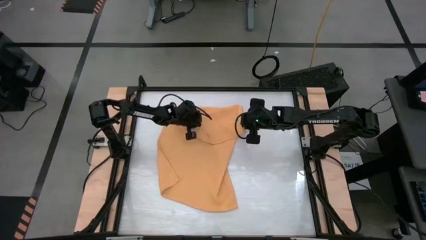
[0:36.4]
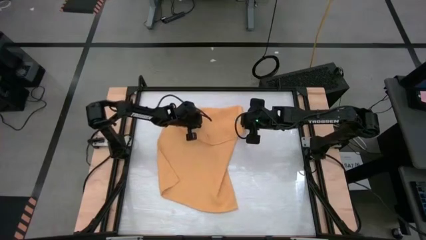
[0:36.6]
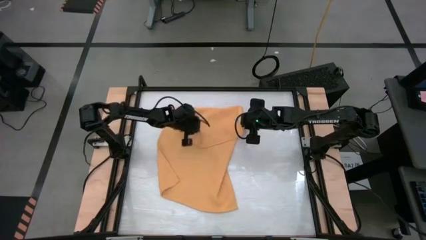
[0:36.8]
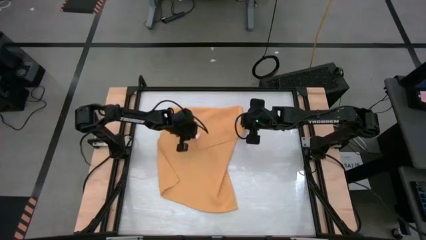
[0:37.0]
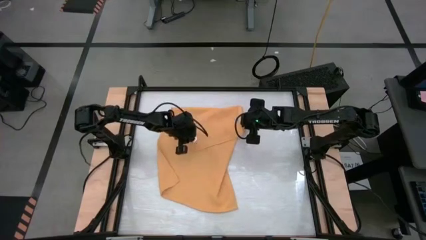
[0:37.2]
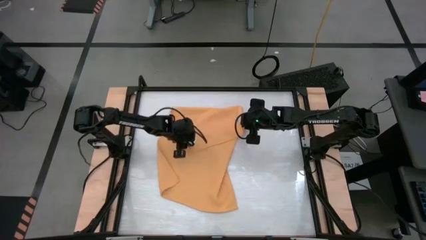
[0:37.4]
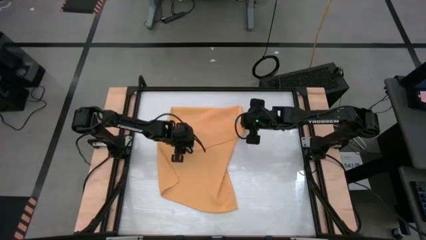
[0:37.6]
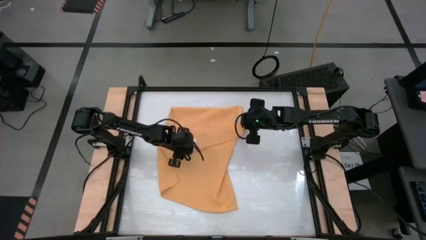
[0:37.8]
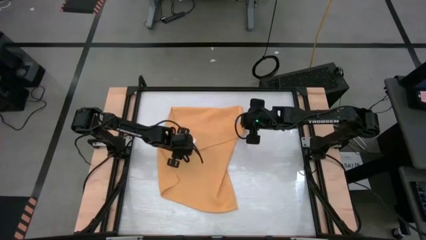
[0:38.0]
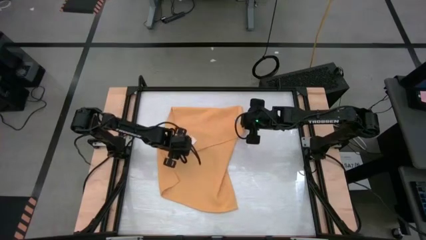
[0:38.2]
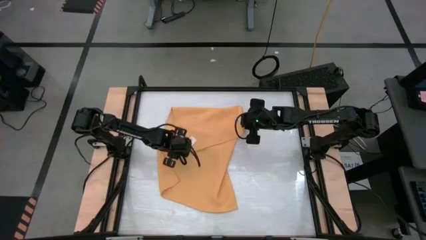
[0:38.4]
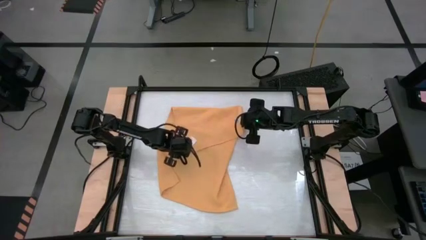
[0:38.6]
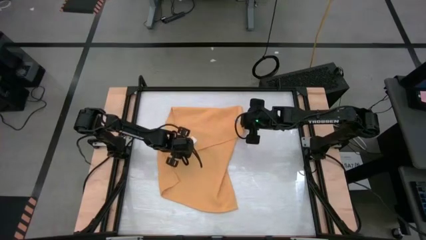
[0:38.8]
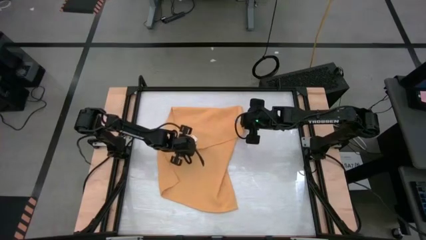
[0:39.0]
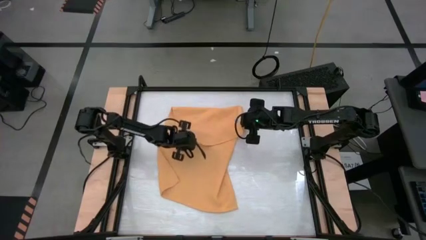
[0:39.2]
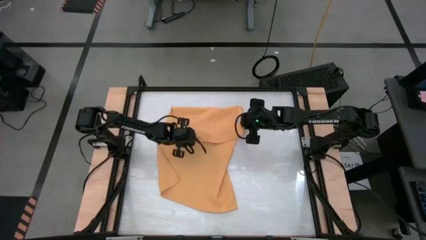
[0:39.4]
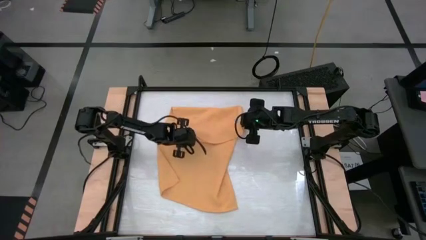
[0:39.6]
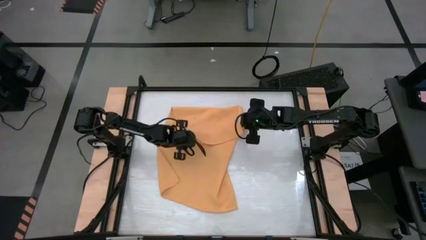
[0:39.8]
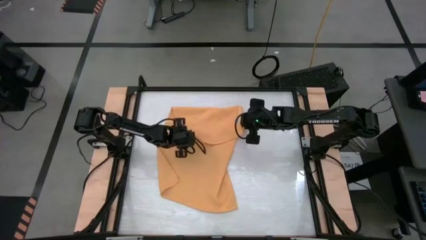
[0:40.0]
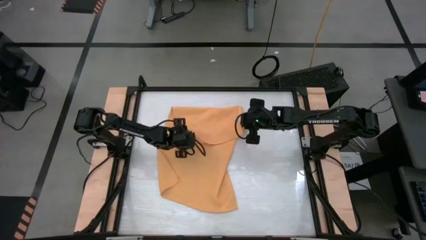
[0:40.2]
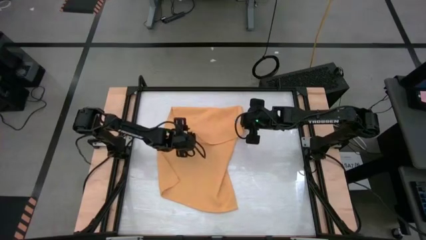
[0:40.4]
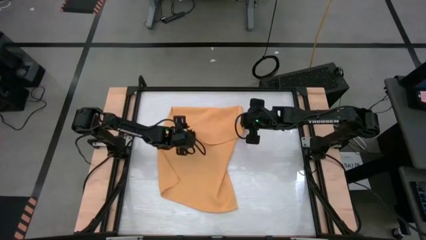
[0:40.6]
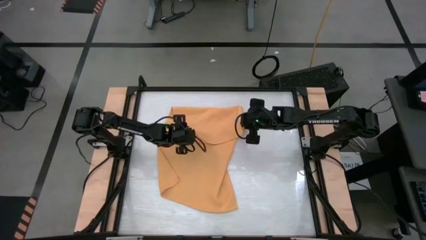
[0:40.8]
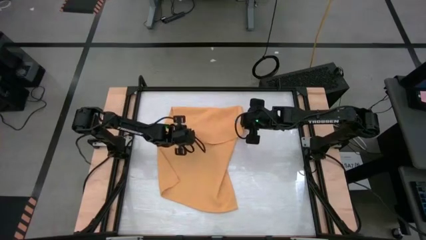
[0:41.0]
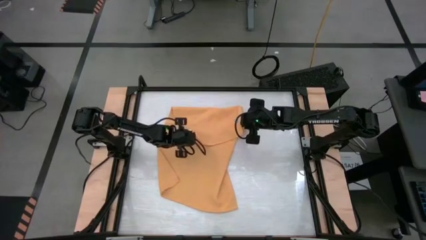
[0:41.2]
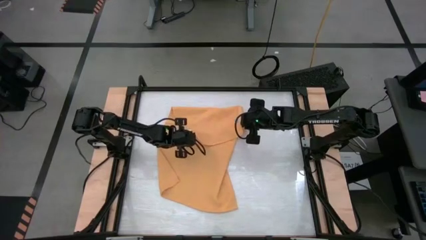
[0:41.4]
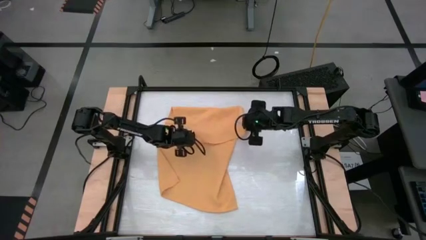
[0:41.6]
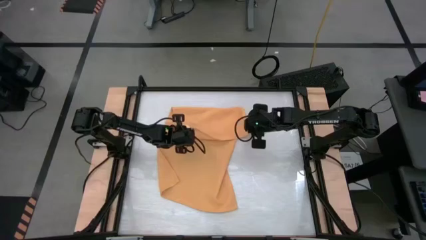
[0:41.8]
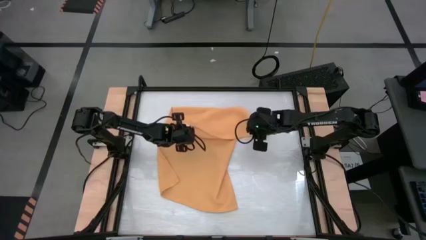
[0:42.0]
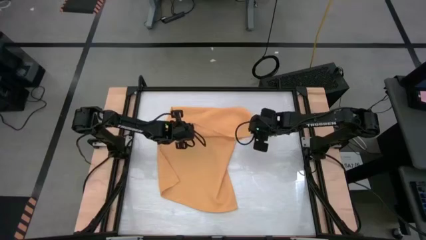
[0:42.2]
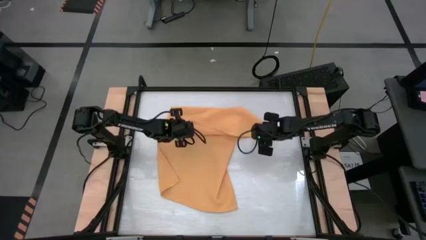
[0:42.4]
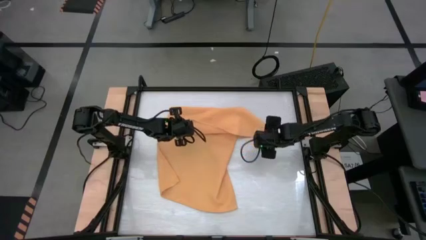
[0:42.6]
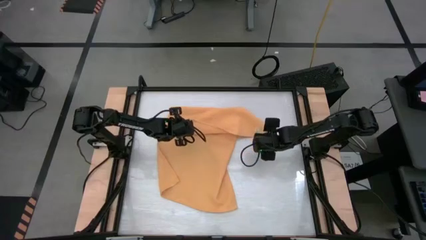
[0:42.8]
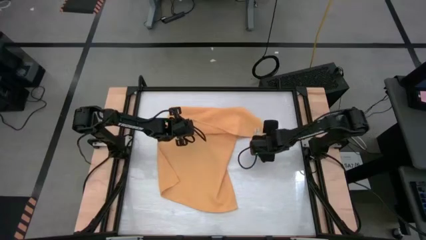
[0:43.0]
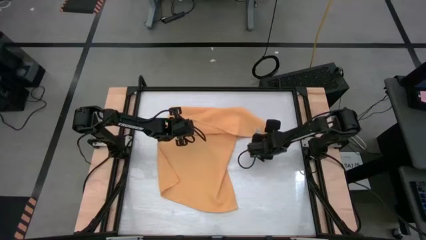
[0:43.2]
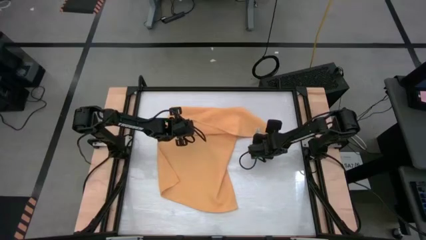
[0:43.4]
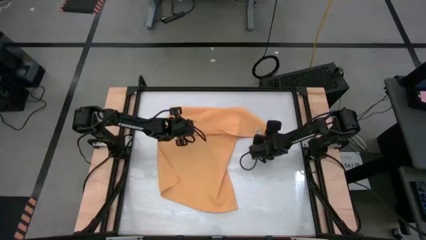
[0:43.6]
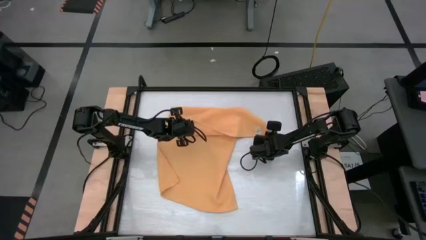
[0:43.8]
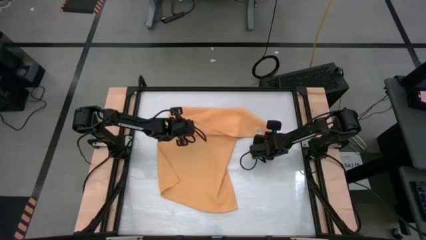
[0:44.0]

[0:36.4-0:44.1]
Task: Roll towel
Roll the yellow towel

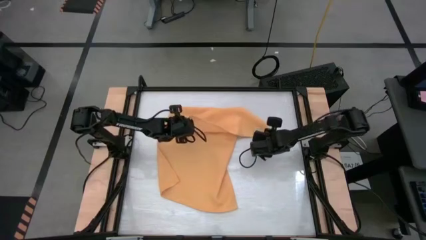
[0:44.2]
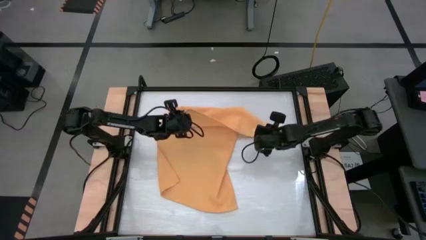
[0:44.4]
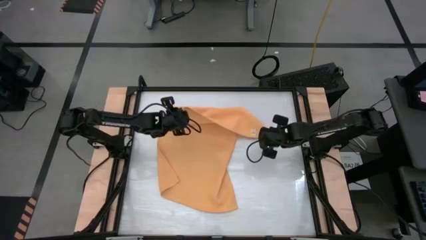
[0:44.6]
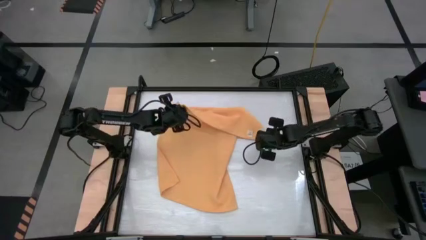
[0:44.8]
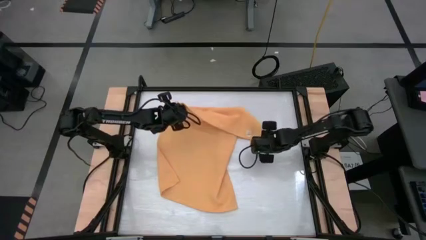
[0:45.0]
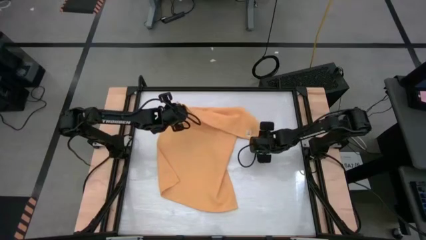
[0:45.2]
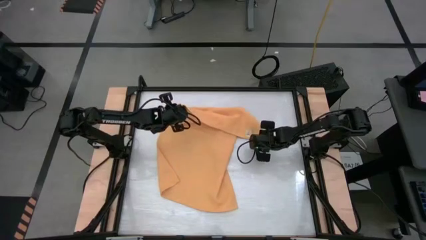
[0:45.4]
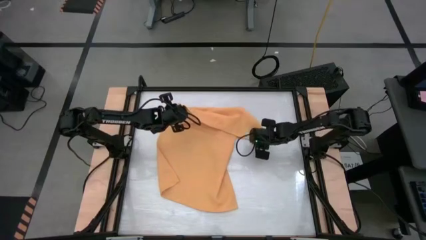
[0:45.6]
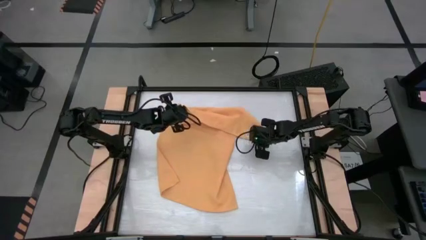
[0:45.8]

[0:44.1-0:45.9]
Roll the yellow towel
